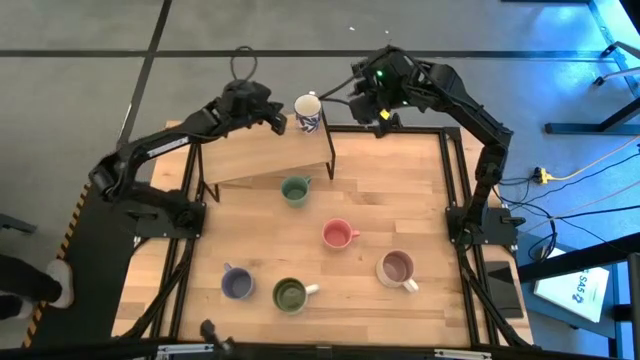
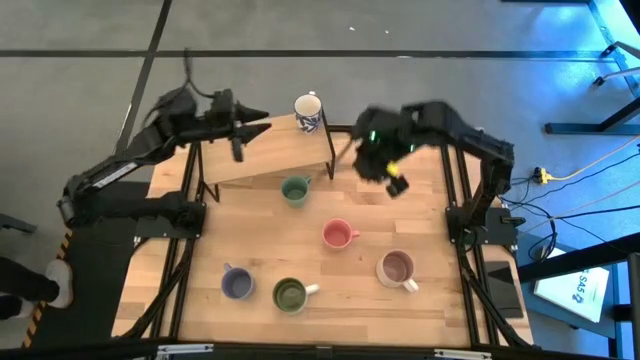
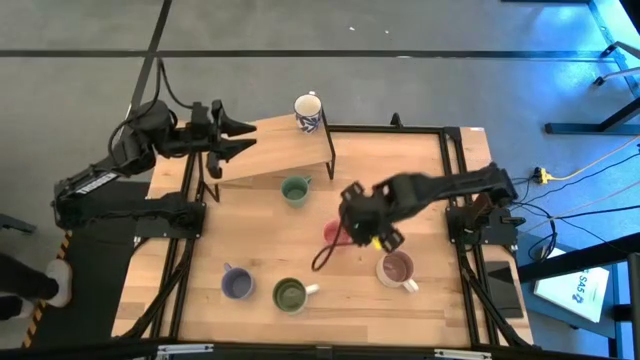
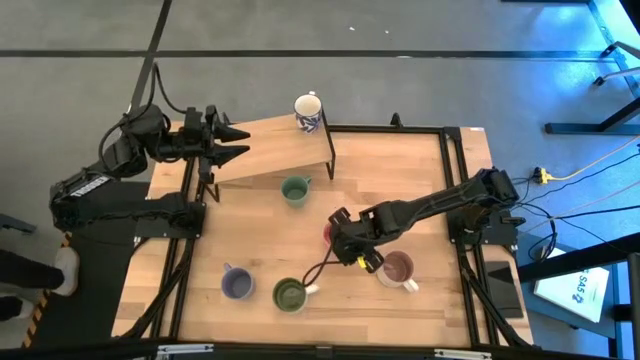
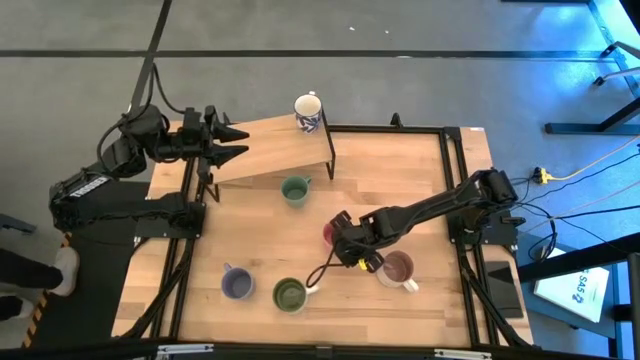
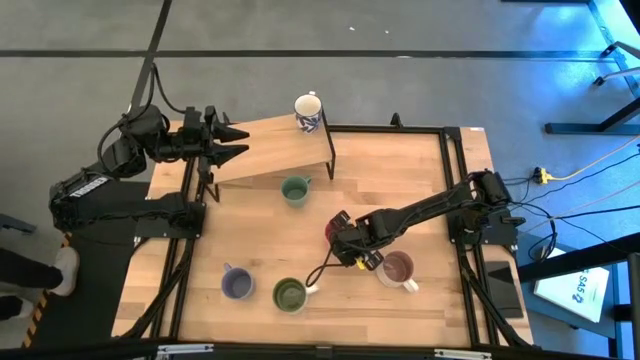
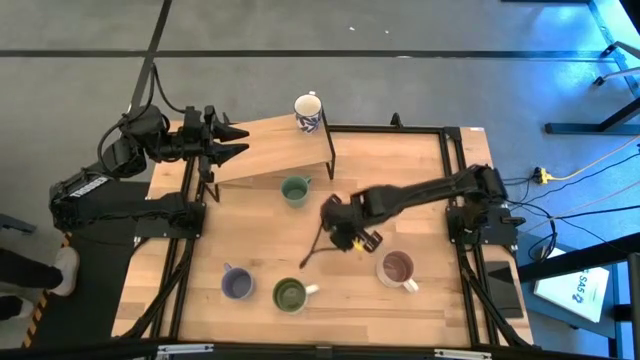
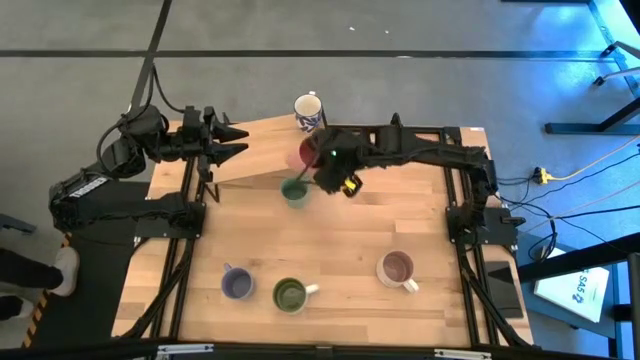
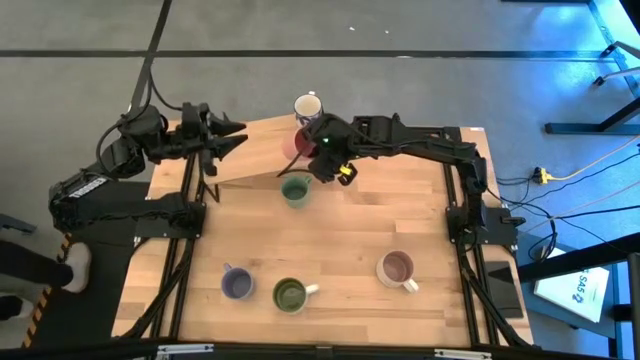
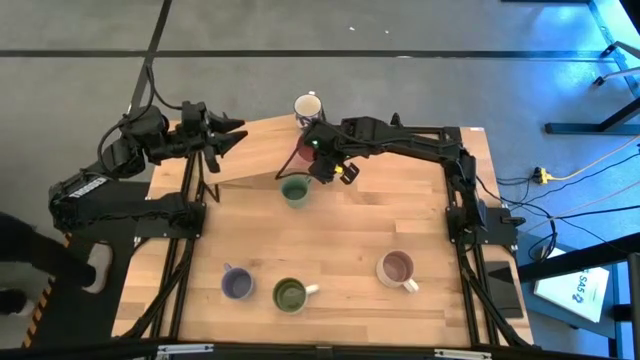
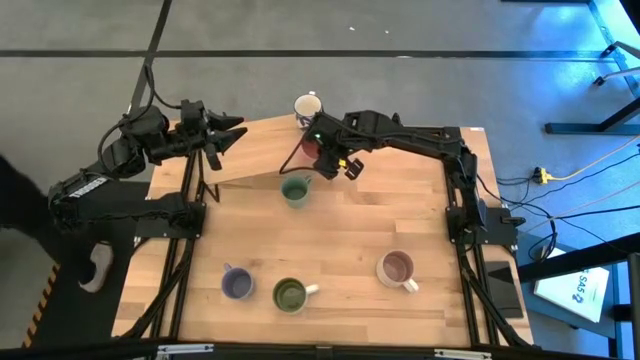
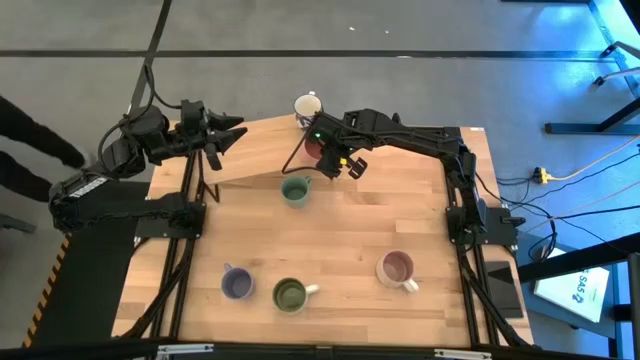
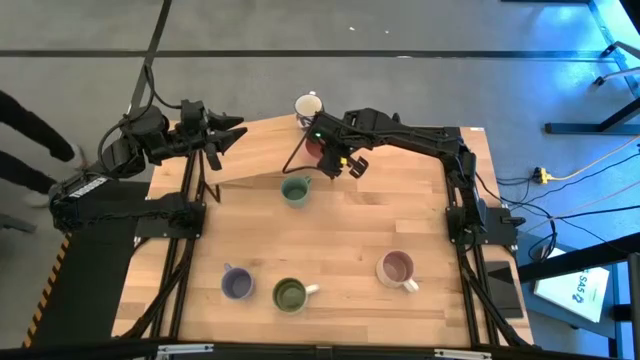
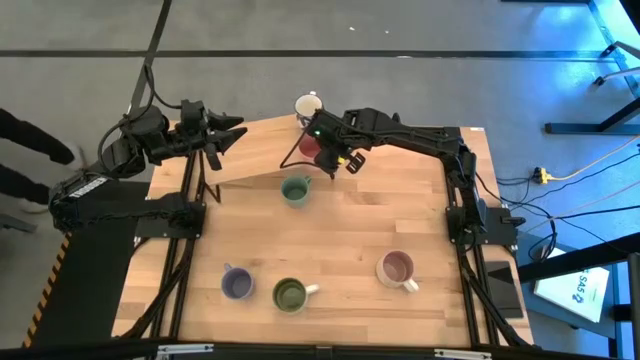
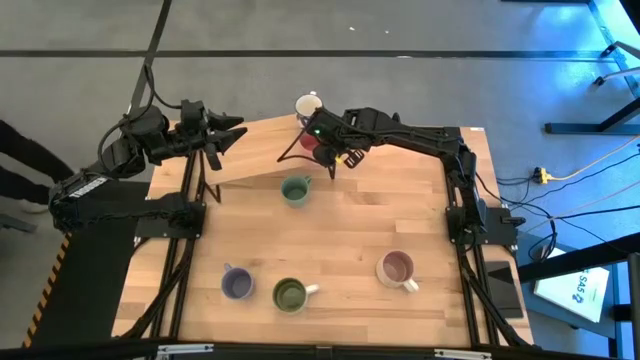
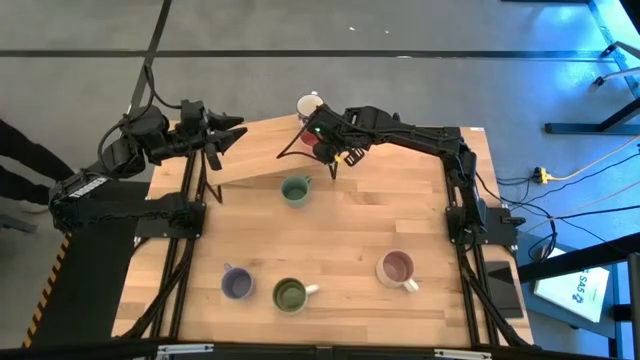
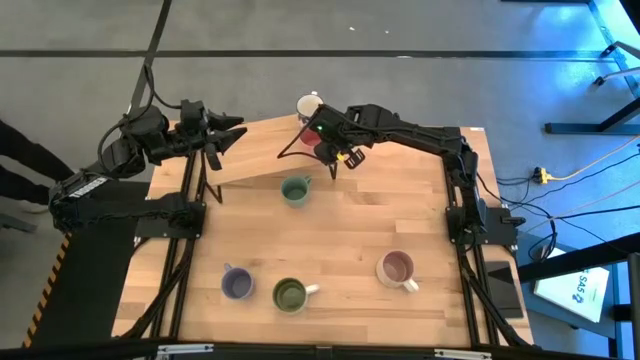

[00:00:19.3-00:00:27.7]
Task: Place coffee mugs
Put the pink mug on the shelf

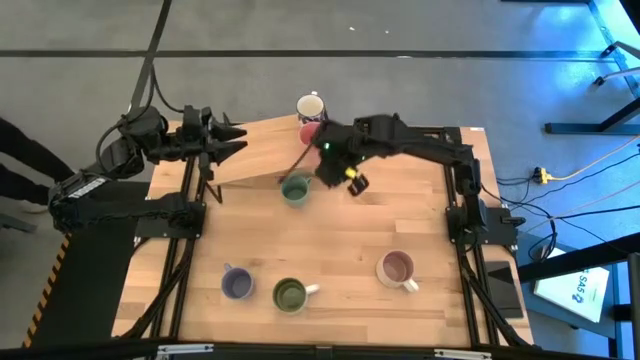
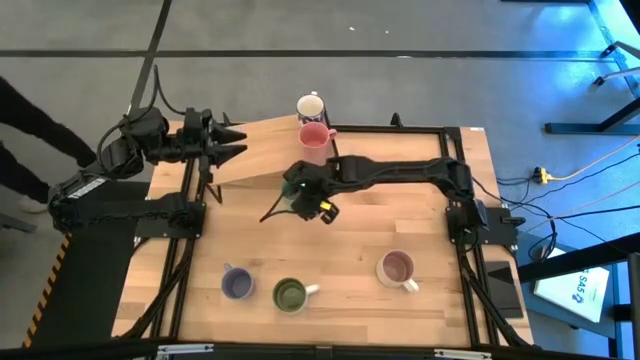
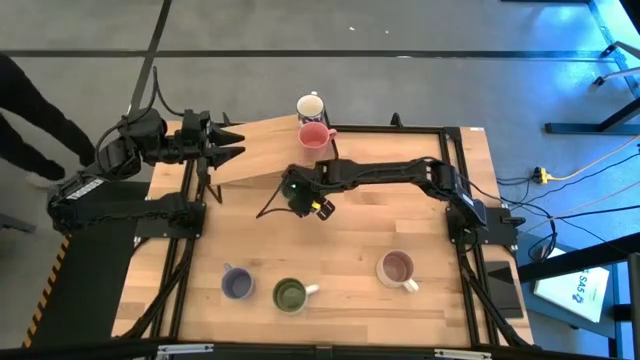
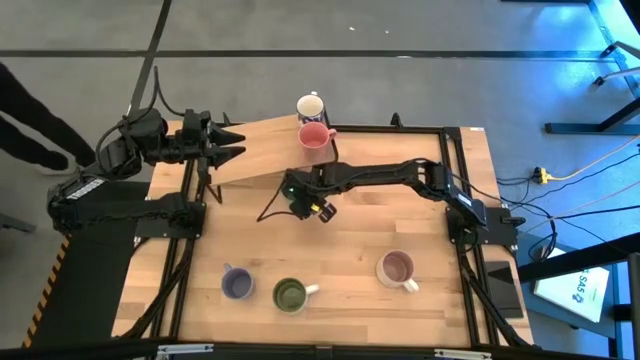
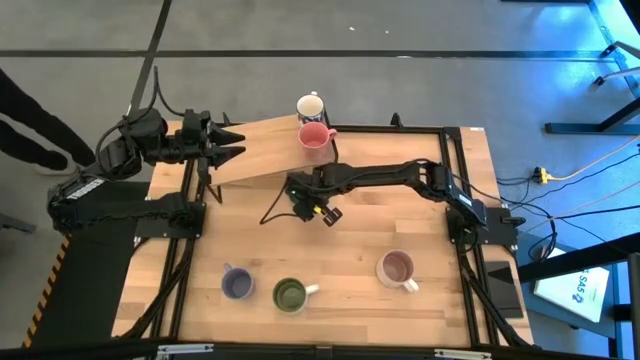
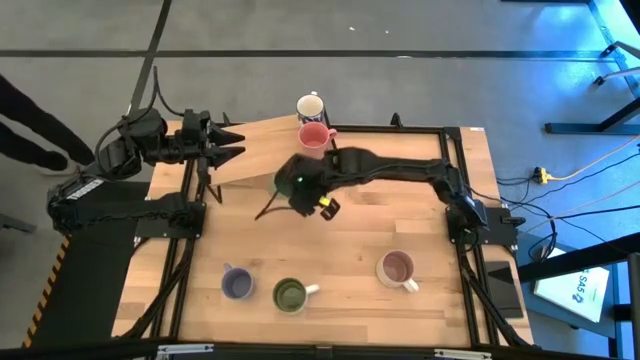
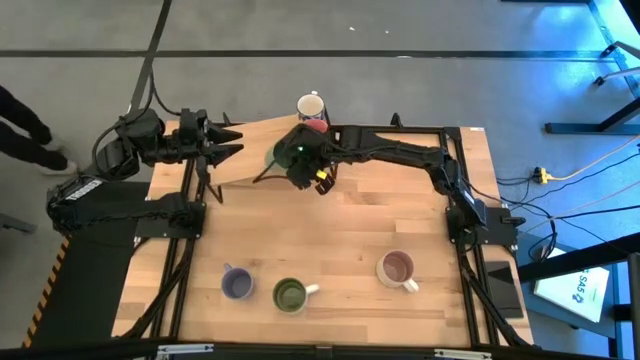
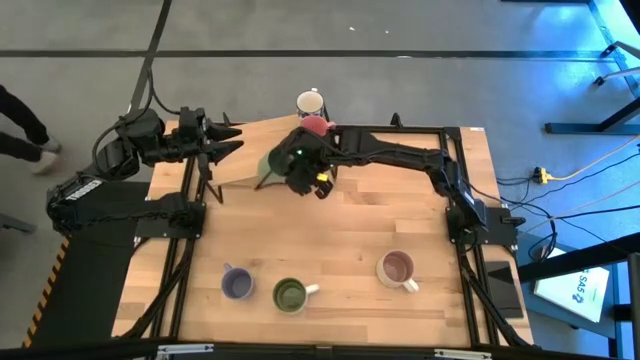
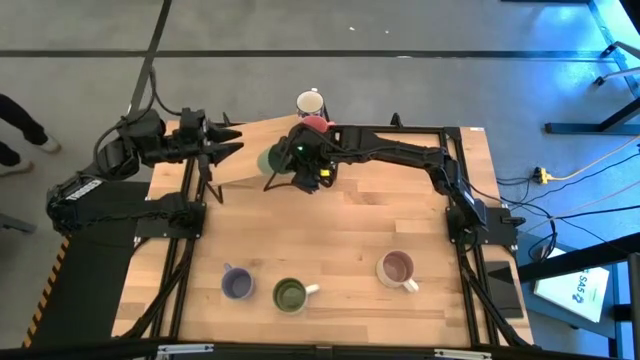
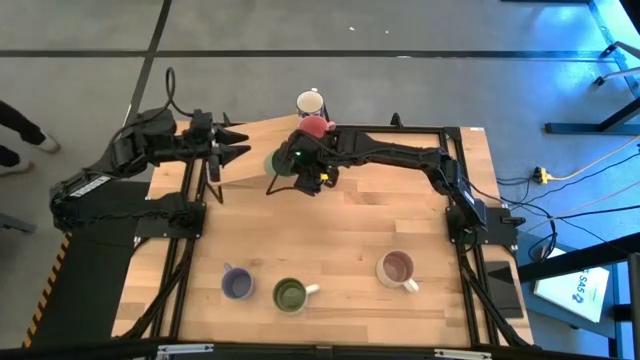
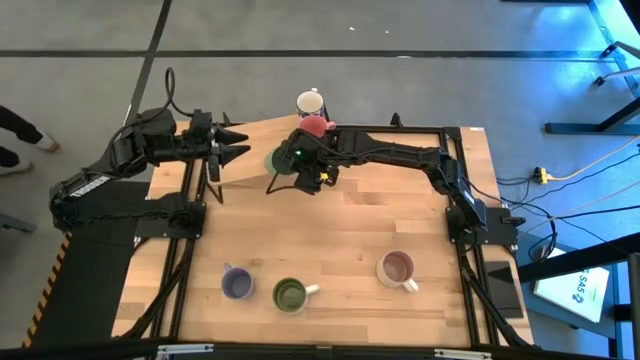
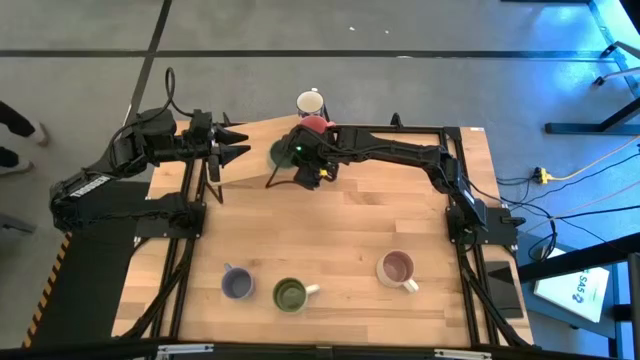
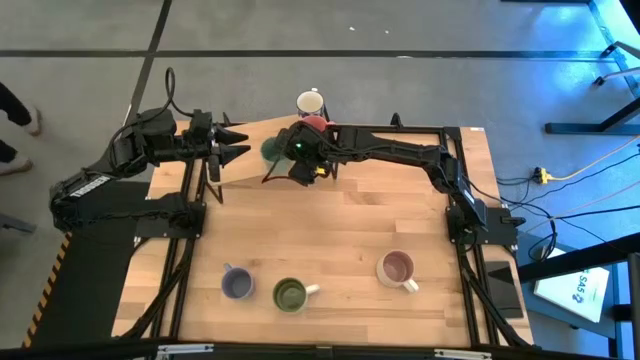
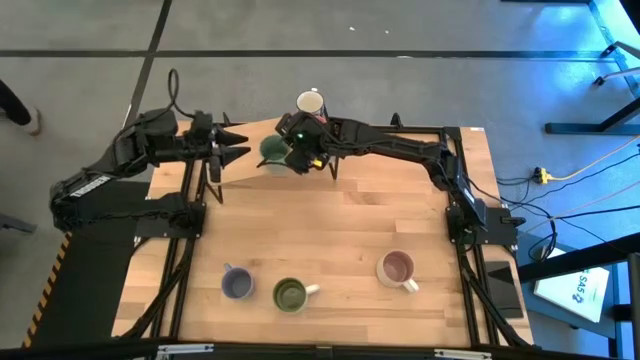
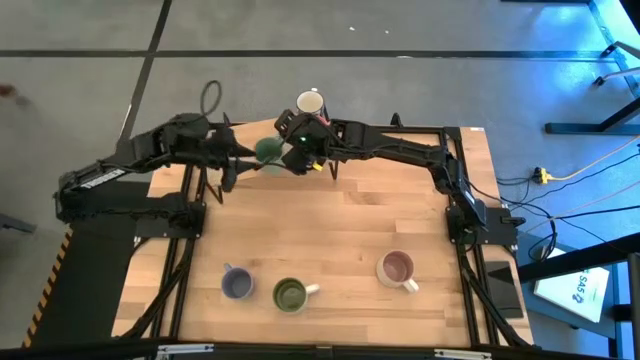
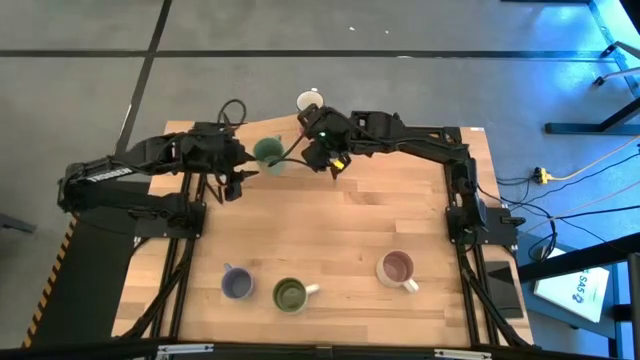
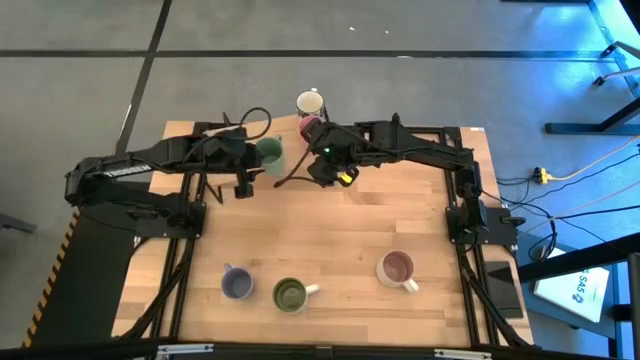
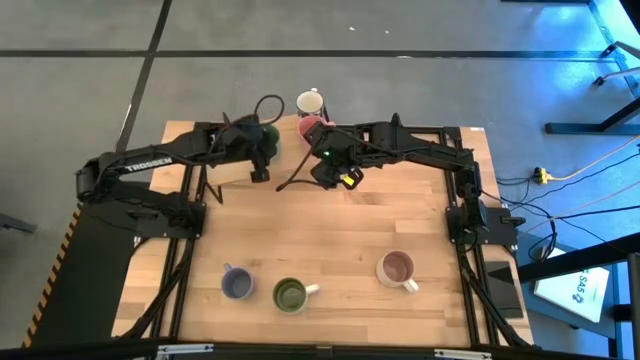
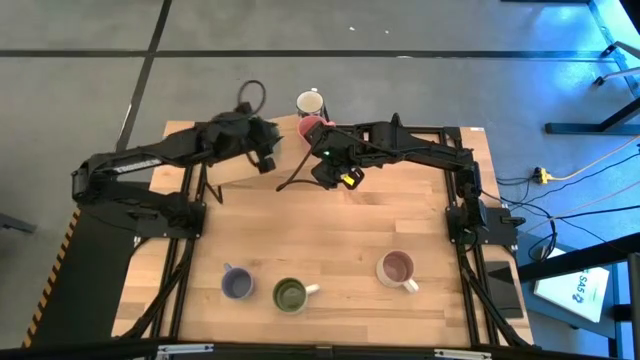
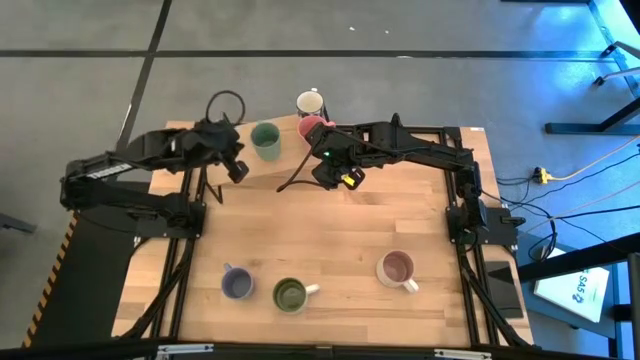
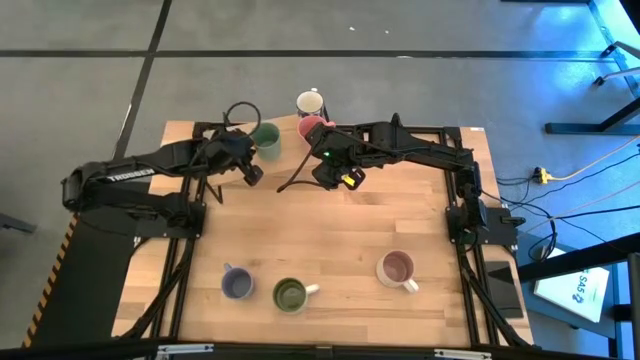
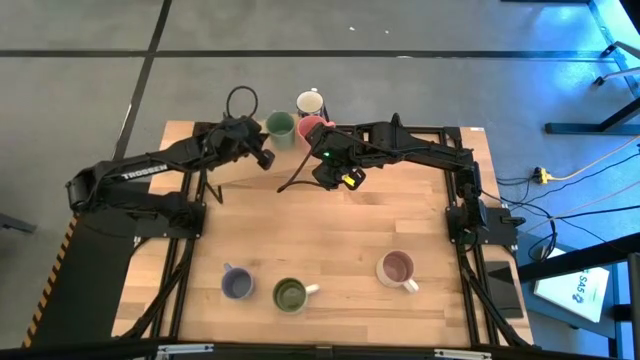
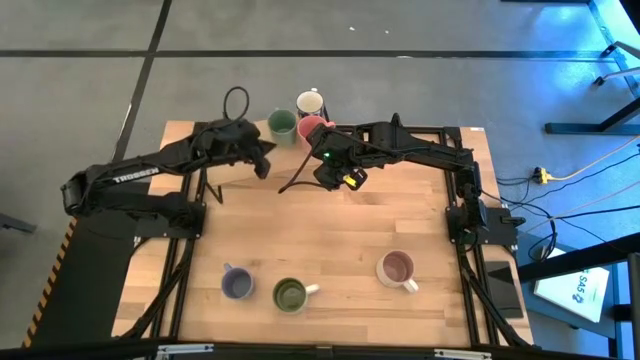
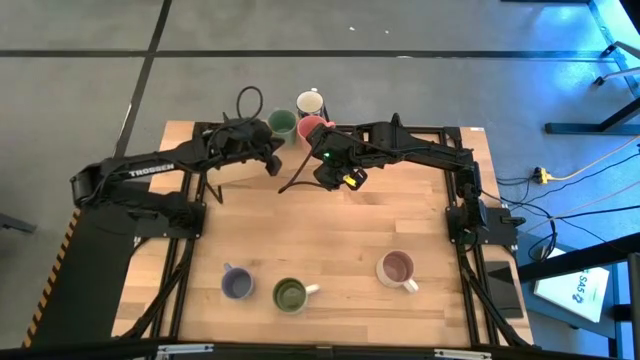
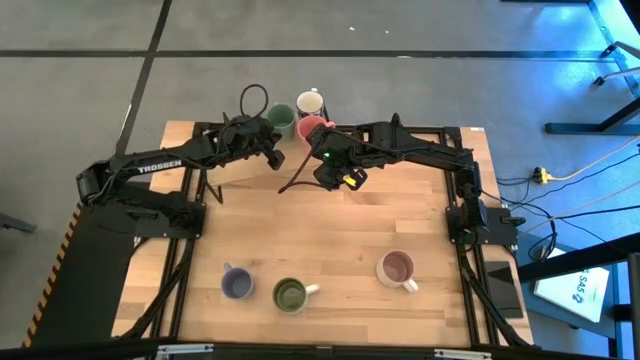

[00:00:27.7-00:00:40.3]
Put the light green mug on the shelf
